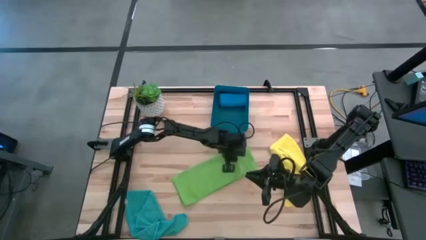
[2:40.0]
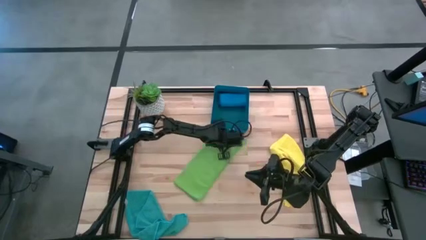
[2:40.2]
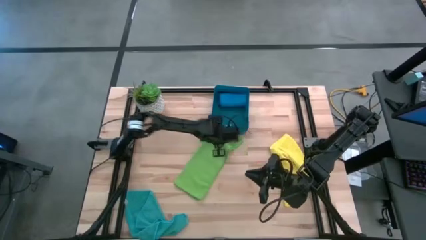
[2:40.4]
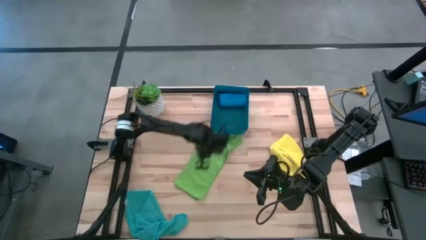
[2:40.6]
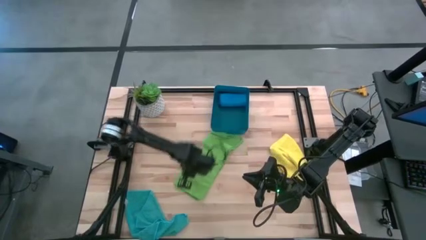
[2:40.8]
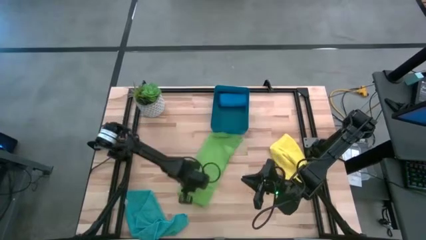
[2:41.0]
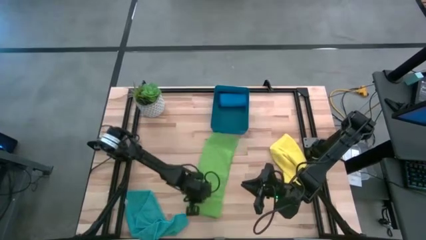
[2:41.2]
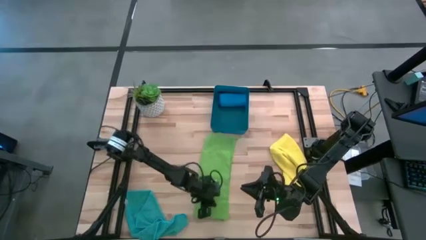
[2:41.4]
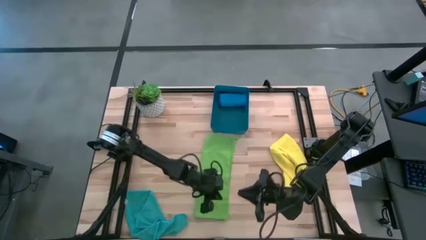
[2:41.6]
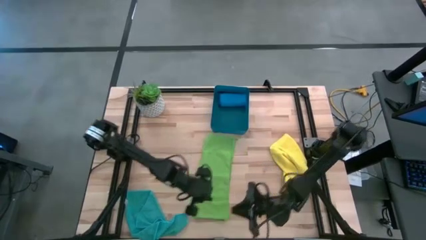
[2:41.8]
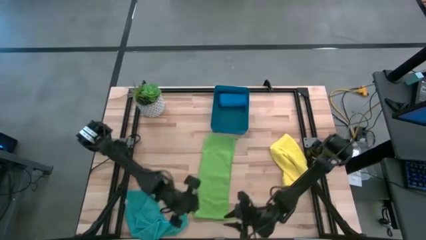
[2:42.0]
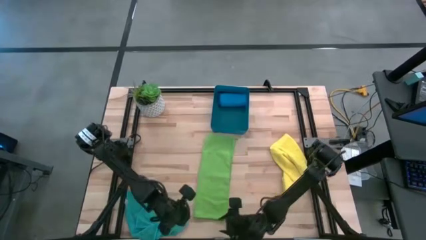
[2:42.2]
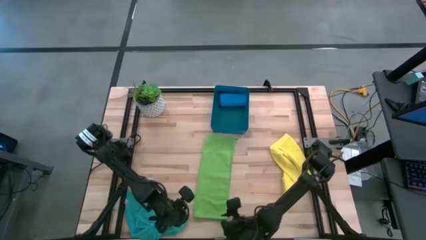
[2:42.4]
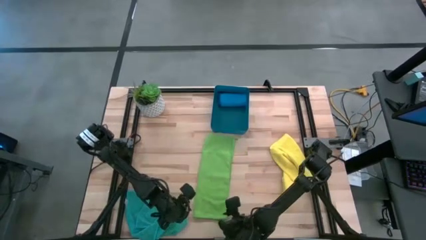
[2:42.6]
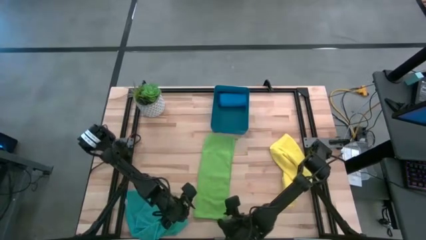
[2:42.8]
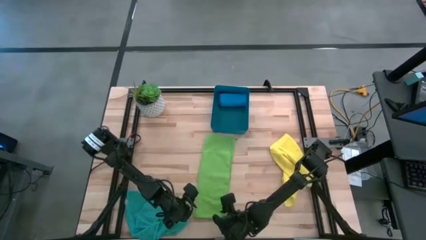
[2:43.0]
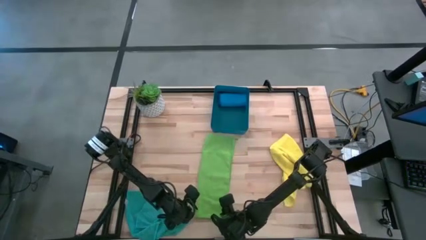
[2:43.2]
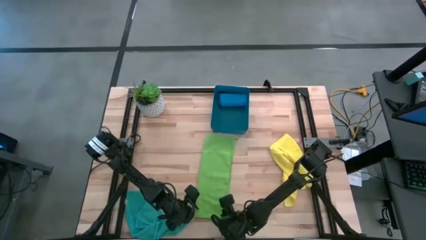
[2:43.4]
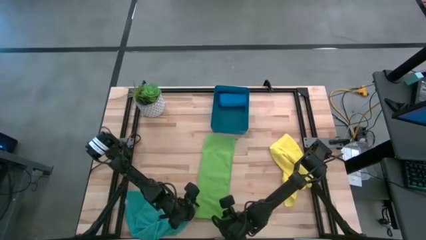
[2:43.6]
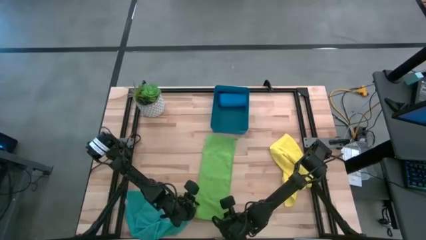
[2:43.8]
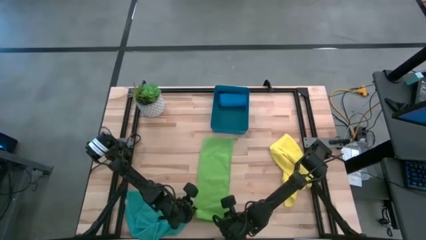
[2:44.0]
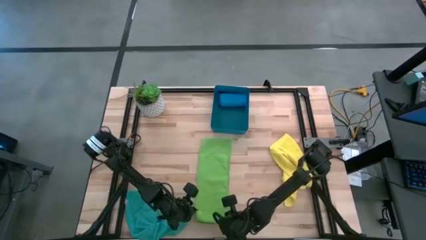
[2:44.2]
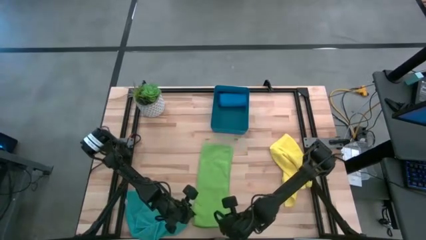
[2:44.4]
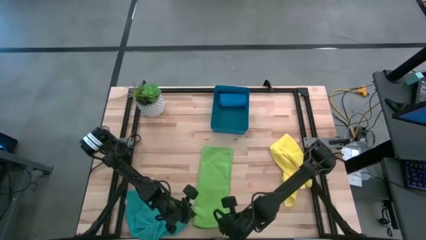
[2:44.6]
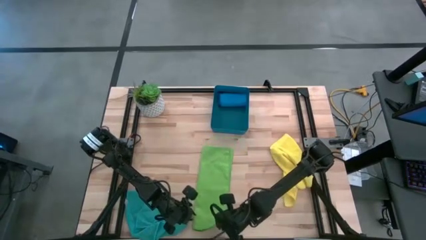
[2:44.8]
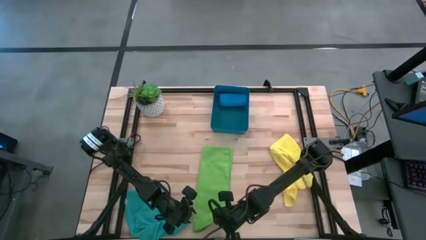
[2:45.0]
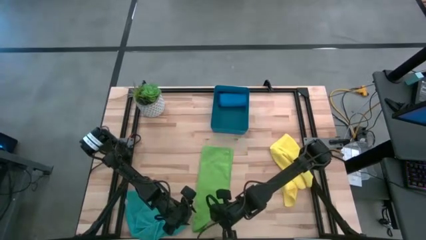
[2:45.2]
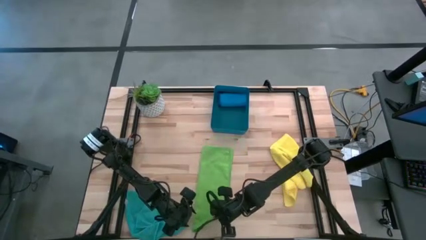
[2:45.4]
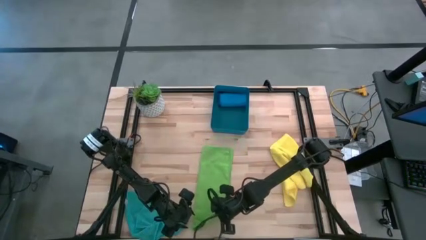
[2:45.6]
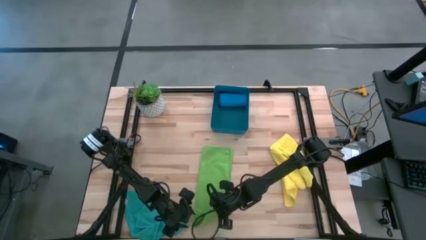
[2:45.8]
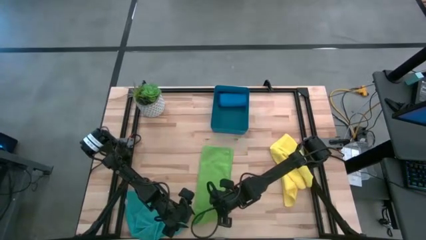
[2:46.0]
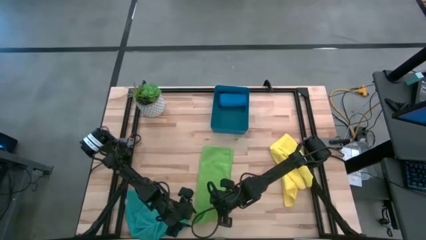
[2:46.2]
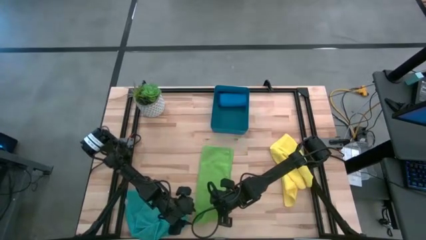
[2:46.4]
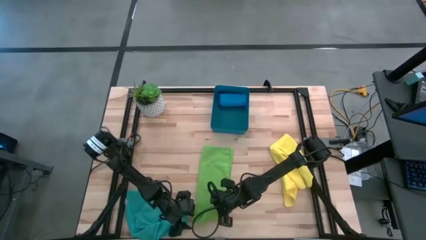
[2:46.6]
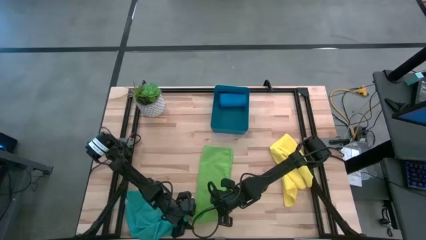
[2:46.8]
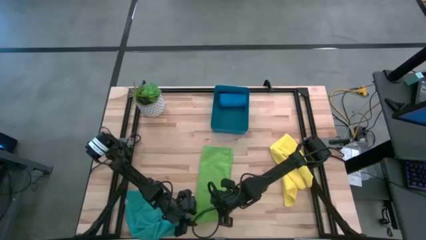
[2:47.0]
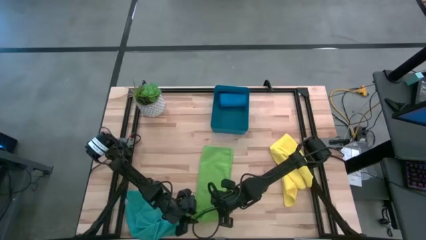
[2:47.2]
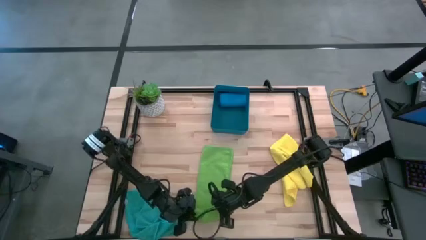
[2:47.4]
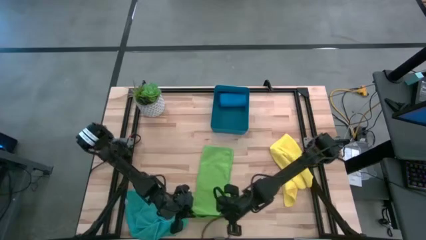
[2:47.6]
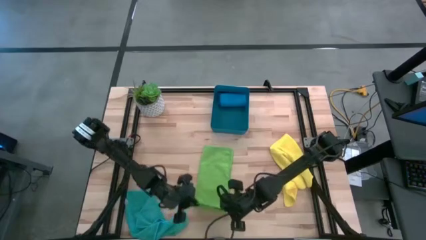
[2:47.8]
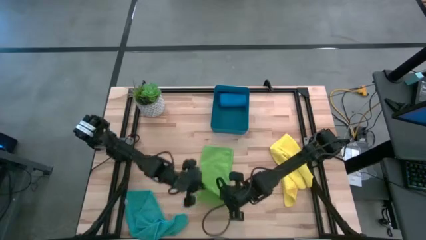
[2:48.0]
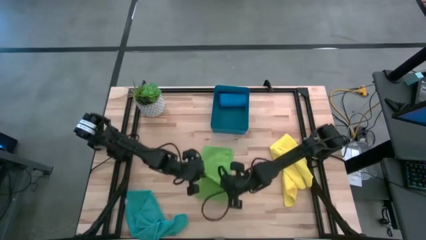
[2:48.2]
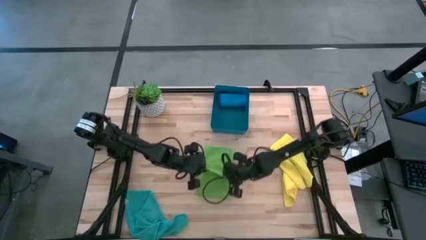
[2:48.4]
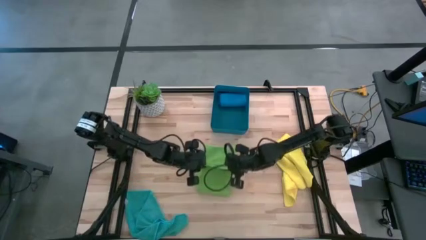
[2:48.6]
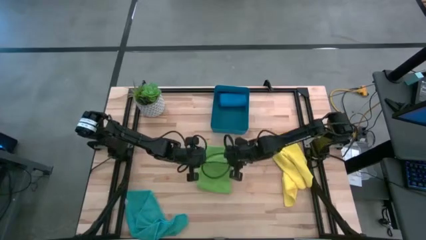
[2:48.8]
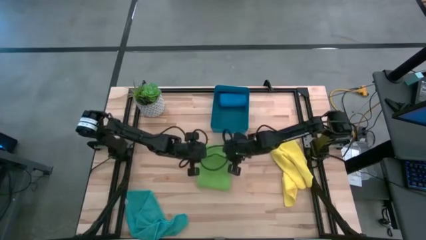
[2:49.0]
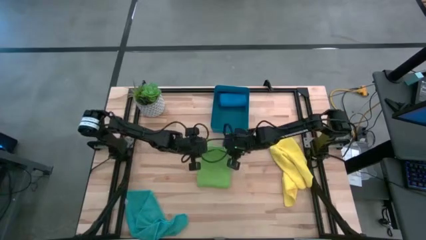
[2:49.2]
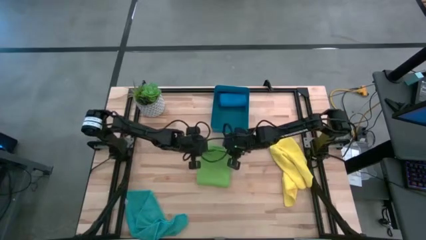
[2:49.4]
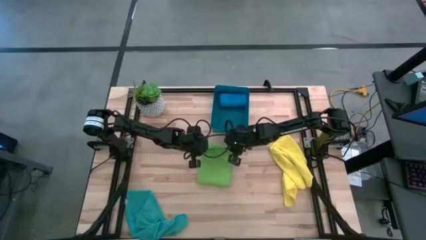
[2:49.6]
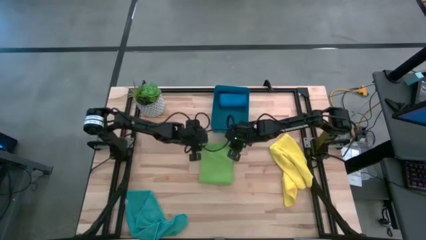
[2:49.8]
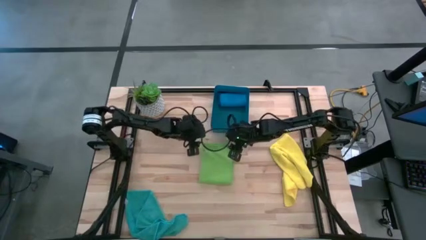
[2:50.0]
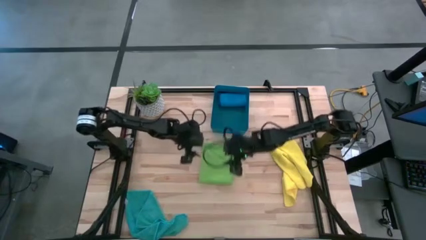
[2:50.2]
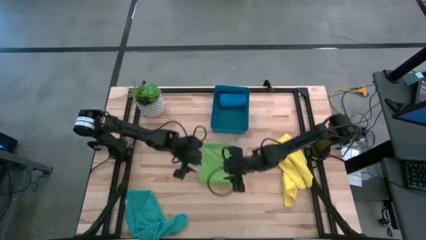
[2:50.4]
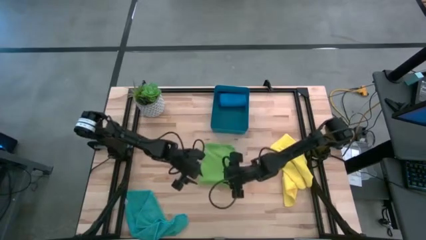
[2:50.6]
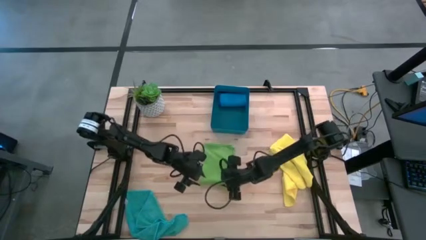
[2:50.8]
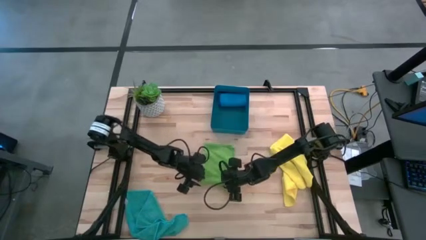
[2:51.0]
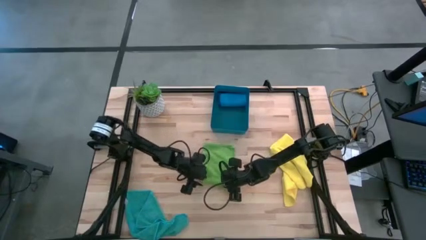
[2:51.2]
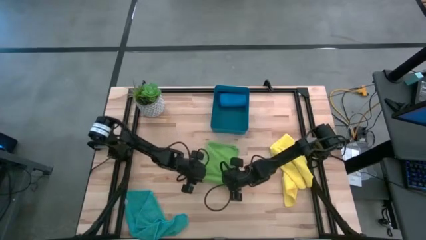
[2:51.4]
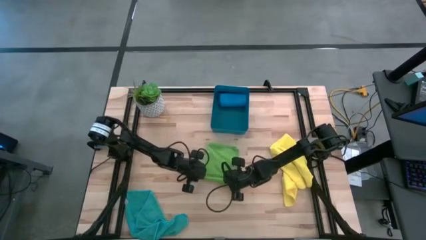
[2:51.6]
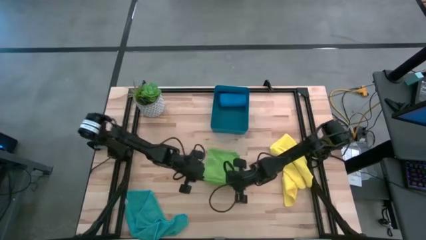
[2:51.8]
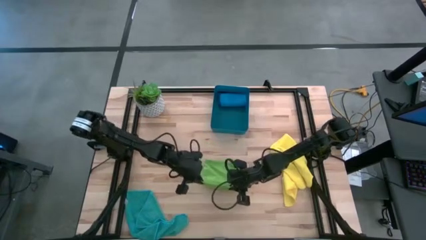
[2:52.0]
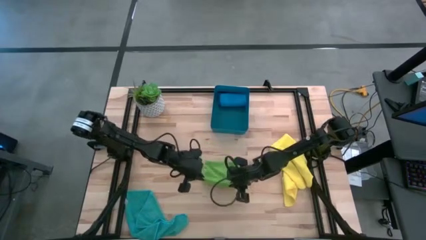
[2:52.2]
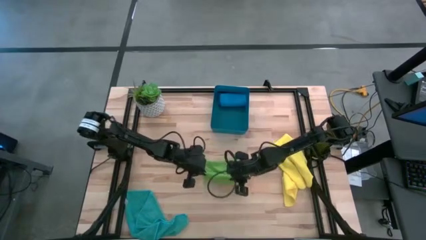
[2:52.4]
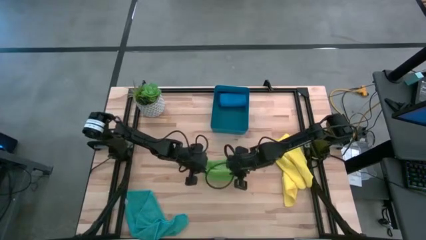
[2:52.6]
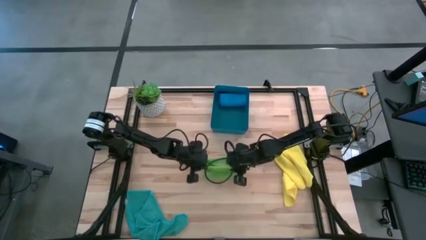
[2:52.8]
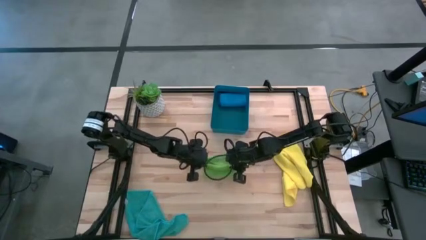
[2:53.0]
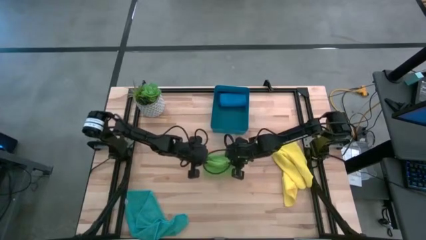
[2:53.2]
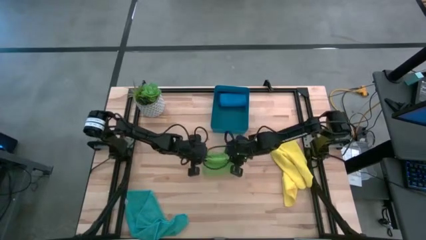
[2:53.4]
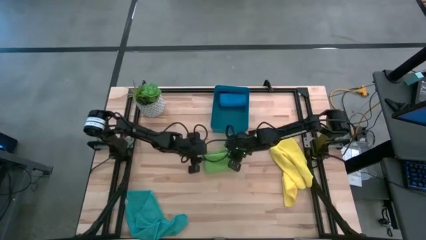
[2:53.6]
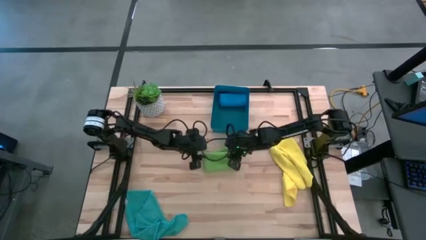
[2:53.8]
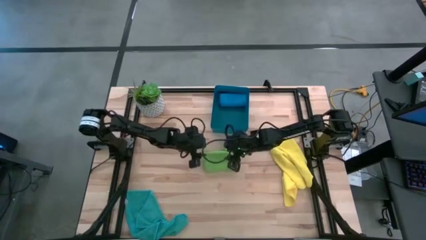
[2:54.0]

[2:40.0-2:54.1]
Task: Fold microfiber towels
Fold the green microfiber cloth

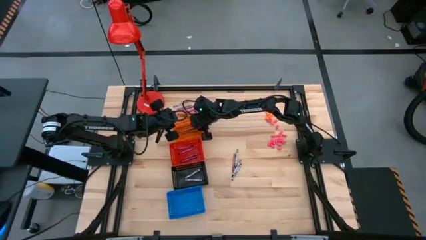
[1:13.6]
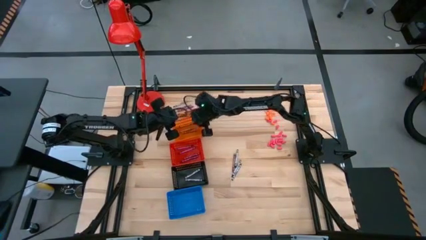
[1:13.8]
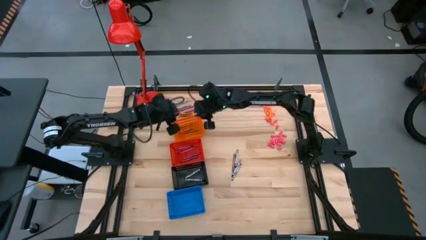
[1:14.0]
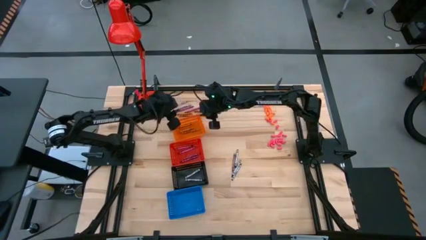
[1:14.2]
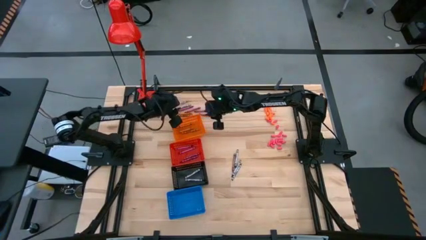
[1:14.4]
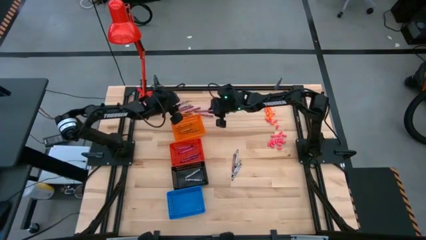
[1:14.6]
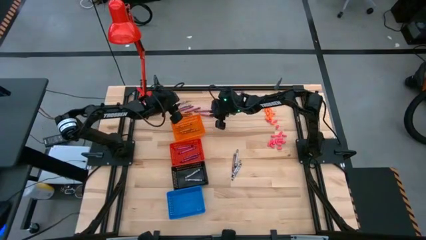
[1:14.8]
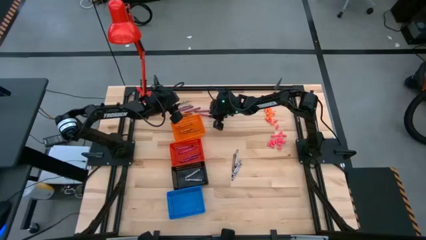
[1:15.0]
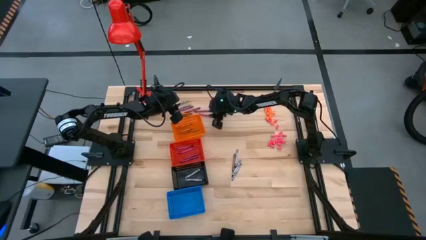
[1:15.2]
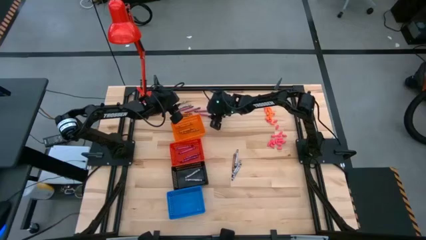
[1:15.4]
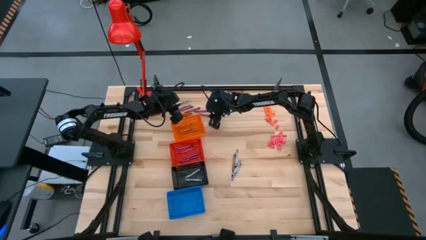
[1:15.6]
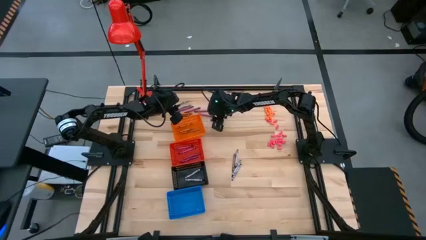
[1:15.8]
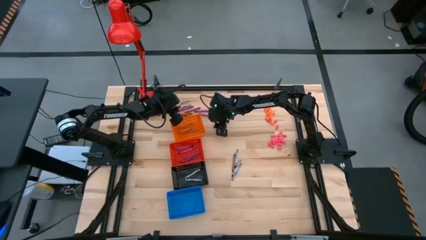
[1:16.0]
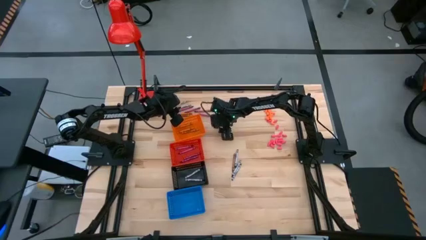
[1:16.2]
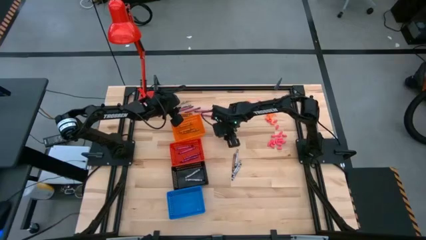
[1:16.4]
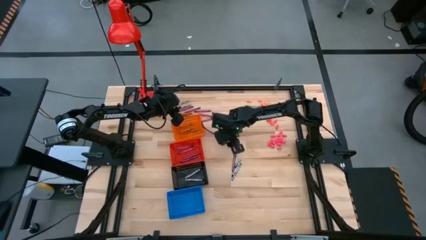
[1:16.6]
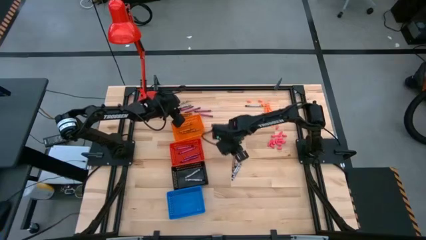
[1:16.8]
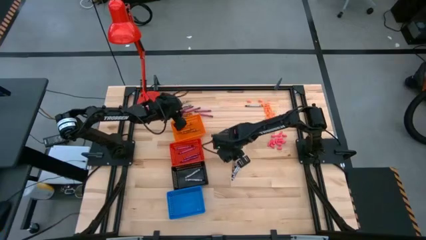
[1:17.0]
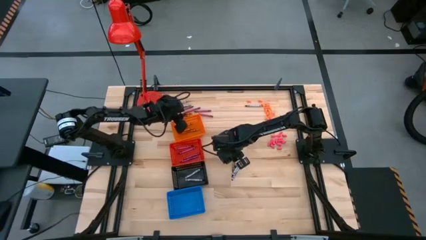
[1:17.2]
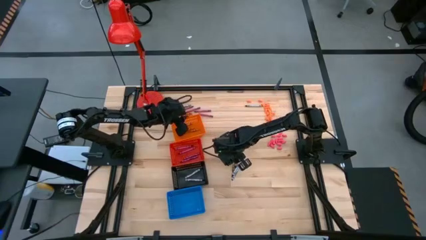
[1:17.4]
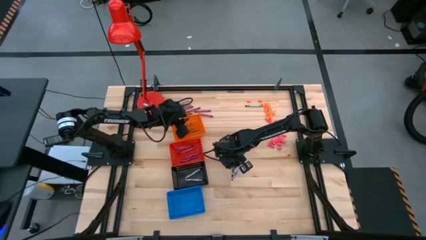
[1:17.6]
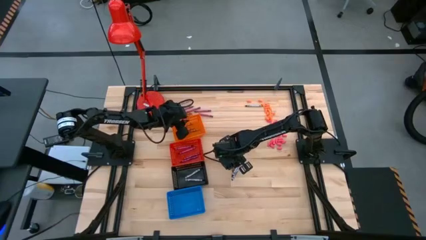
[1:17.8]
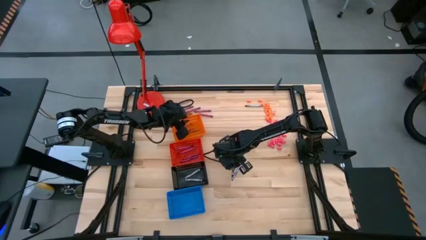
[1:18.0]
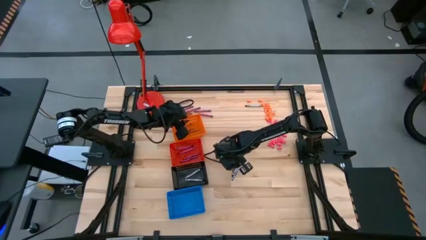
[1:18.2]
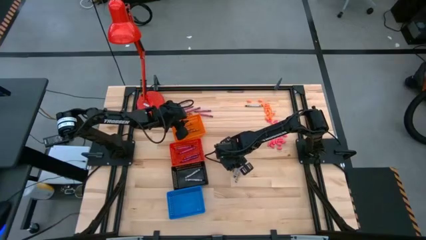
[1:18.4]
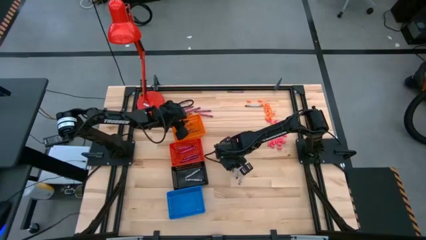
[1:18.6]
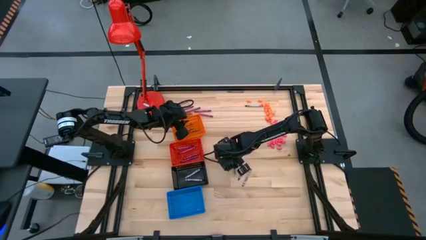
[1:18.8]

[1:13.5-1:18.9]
Task: Sort crayons
Put the brown crayon into the blue basket
